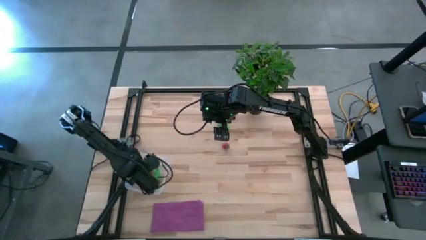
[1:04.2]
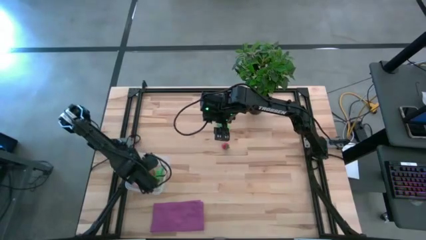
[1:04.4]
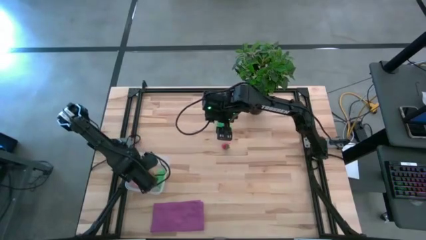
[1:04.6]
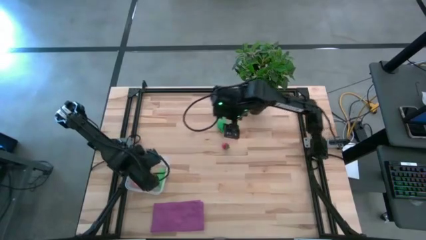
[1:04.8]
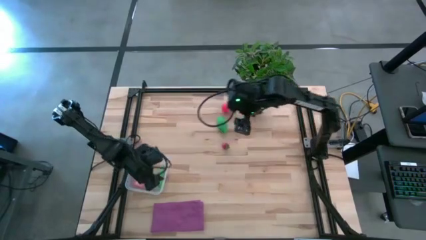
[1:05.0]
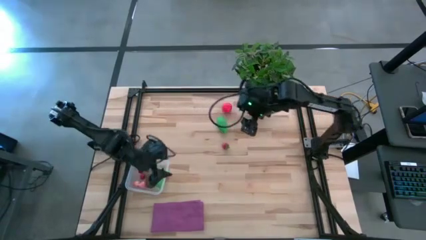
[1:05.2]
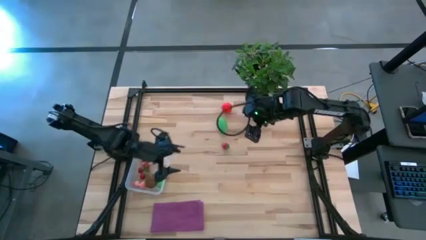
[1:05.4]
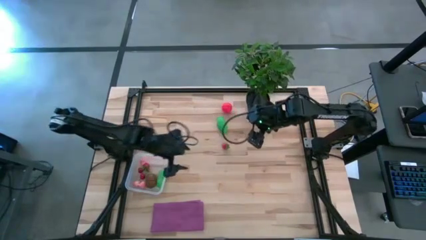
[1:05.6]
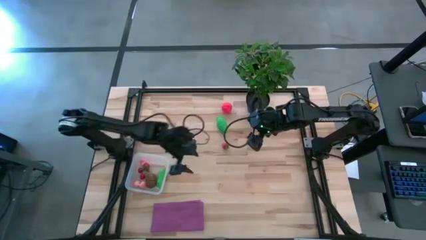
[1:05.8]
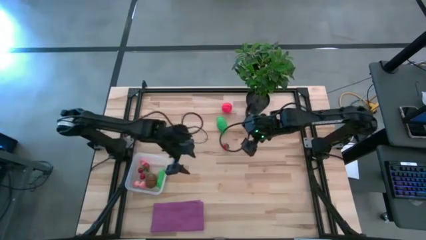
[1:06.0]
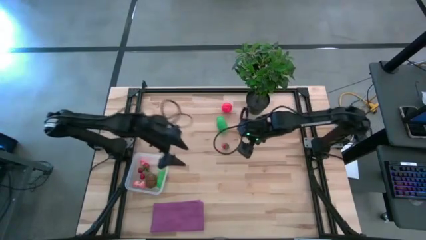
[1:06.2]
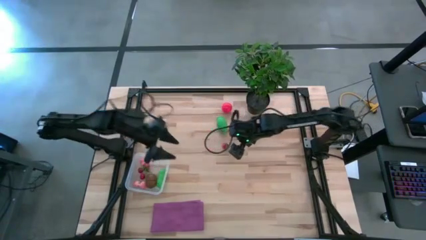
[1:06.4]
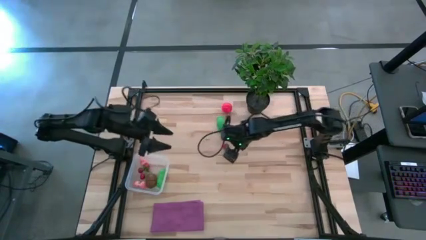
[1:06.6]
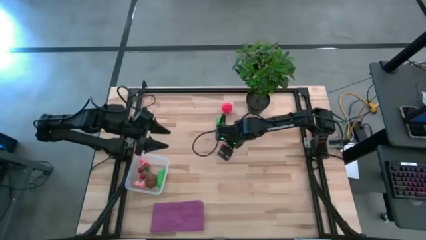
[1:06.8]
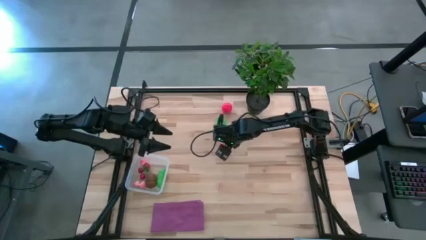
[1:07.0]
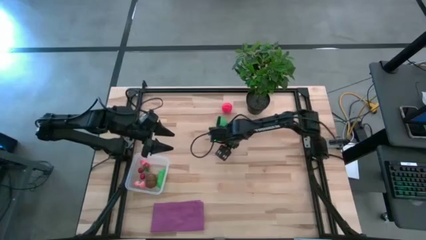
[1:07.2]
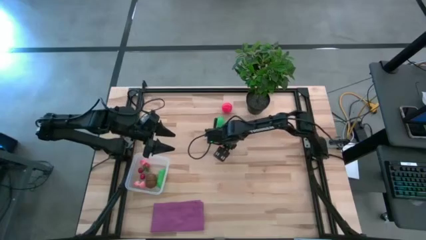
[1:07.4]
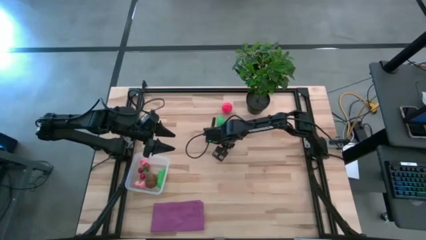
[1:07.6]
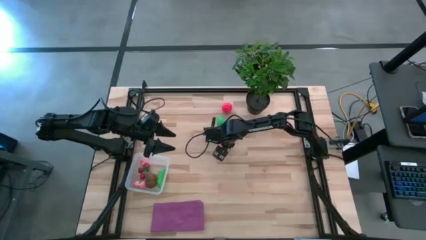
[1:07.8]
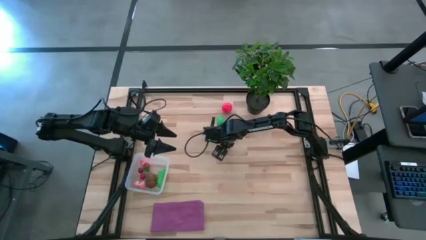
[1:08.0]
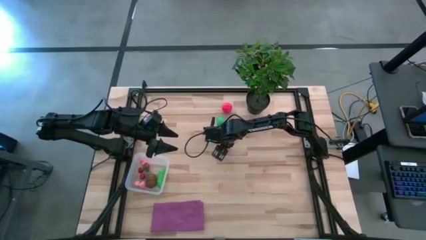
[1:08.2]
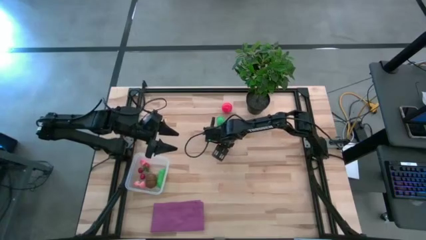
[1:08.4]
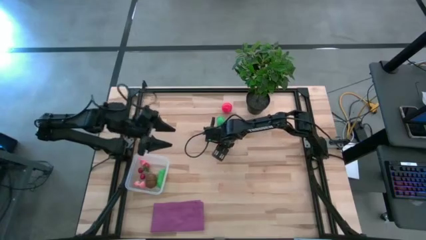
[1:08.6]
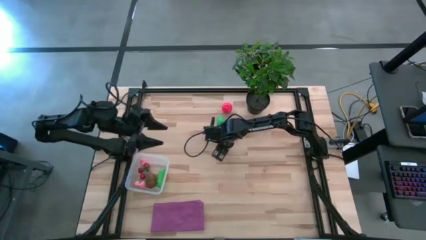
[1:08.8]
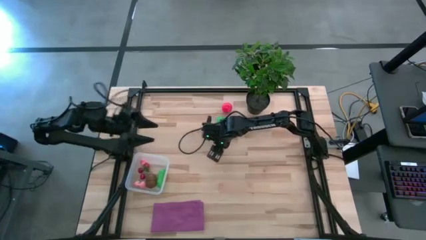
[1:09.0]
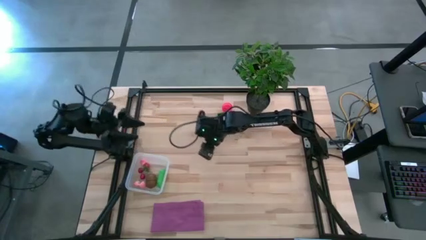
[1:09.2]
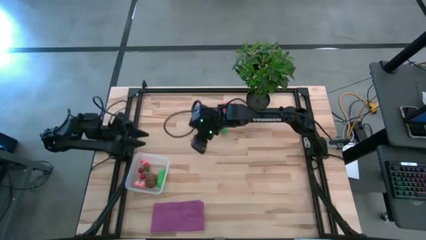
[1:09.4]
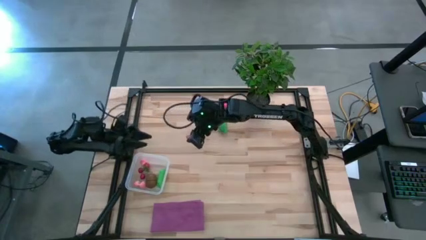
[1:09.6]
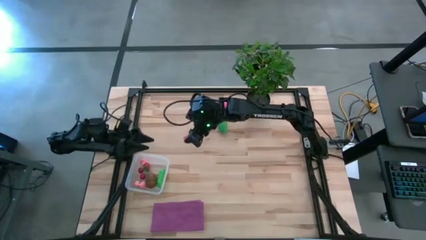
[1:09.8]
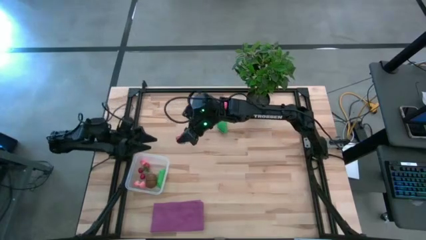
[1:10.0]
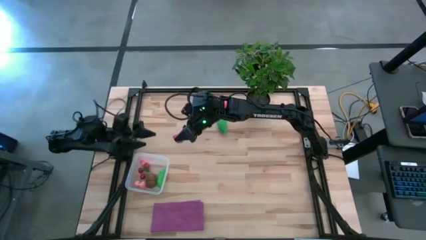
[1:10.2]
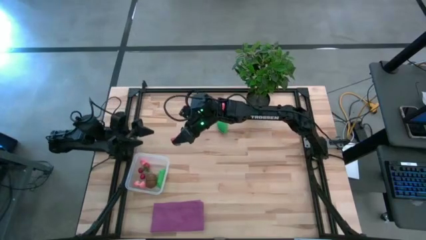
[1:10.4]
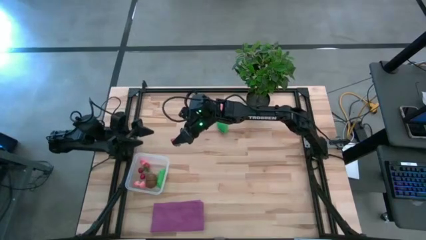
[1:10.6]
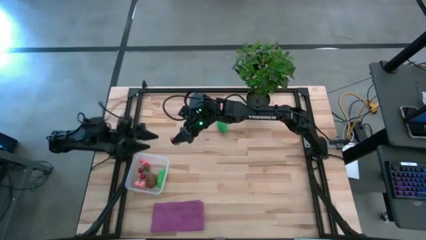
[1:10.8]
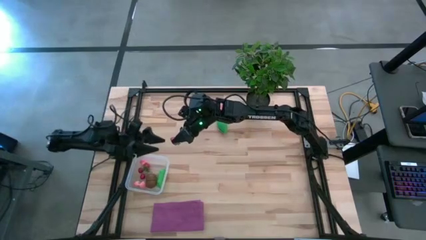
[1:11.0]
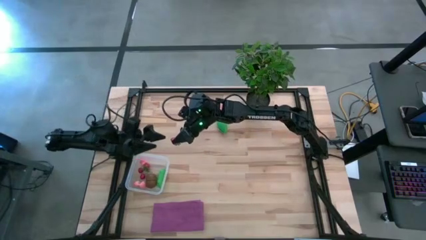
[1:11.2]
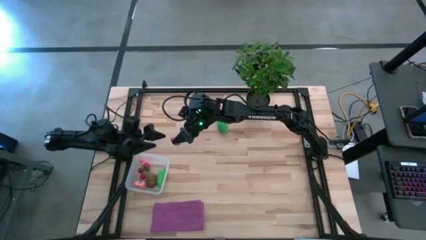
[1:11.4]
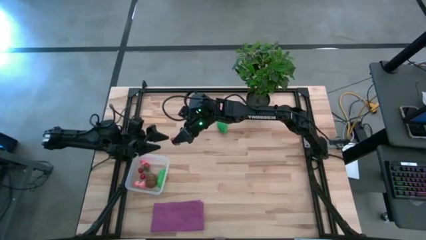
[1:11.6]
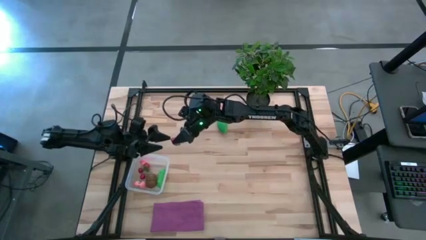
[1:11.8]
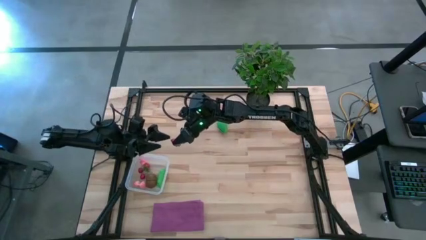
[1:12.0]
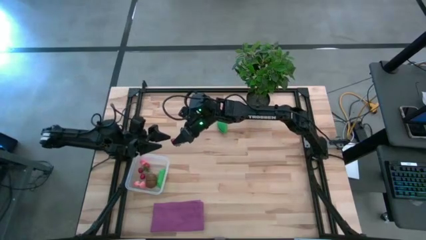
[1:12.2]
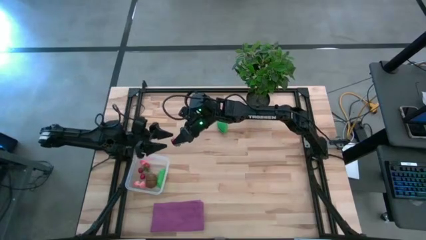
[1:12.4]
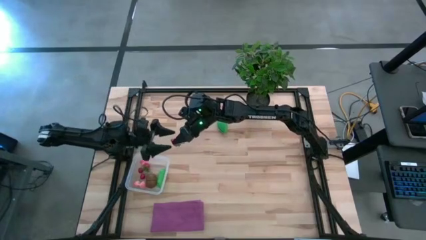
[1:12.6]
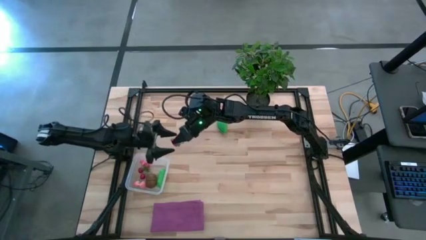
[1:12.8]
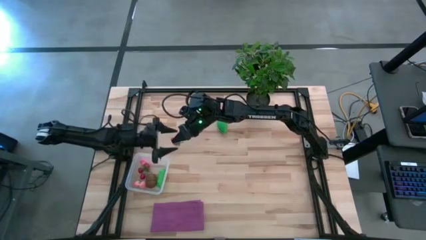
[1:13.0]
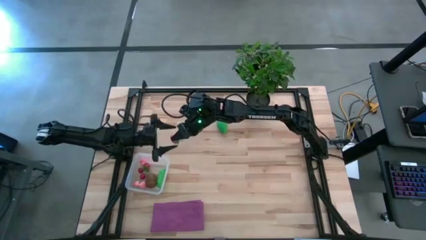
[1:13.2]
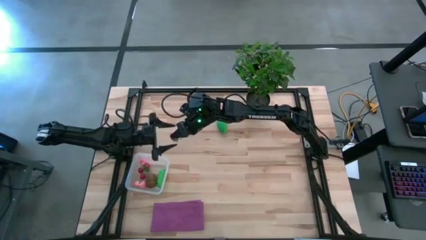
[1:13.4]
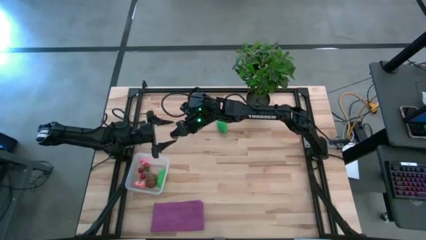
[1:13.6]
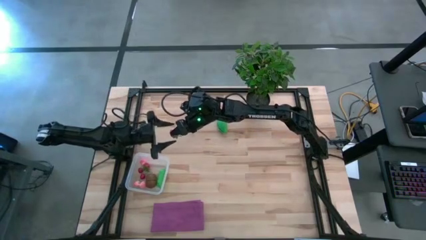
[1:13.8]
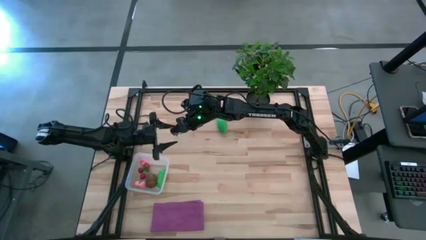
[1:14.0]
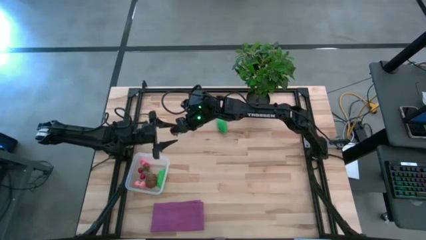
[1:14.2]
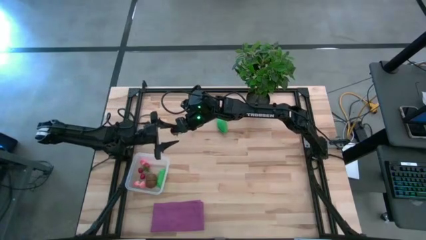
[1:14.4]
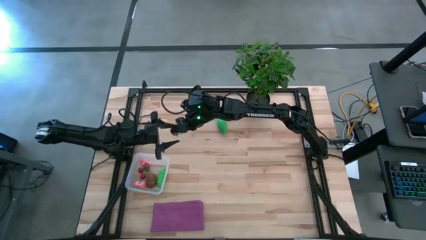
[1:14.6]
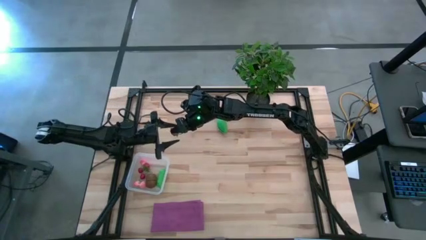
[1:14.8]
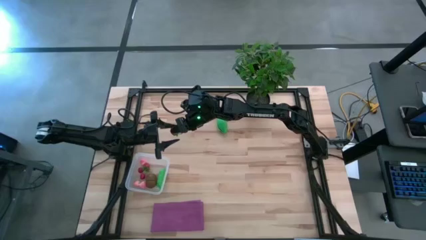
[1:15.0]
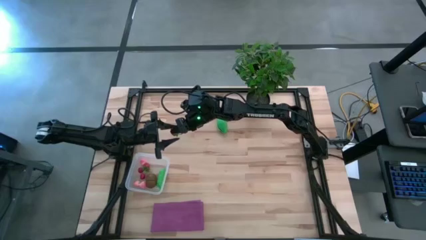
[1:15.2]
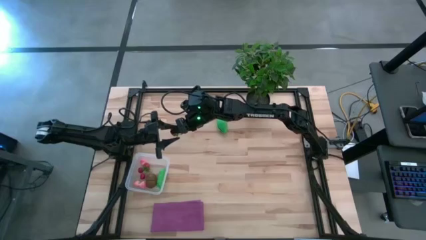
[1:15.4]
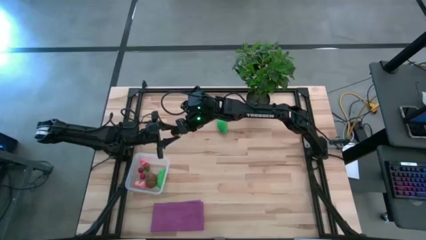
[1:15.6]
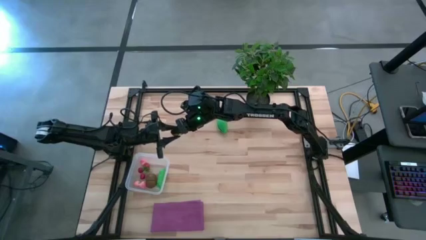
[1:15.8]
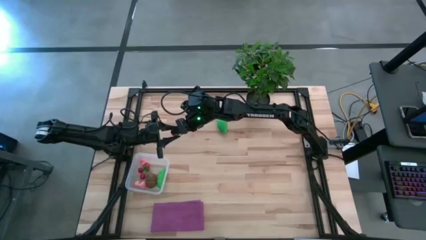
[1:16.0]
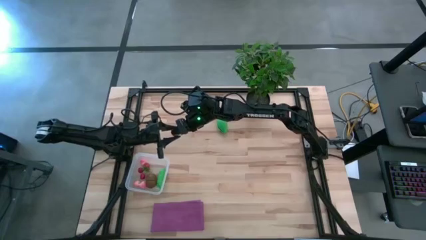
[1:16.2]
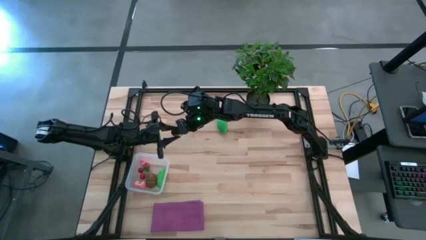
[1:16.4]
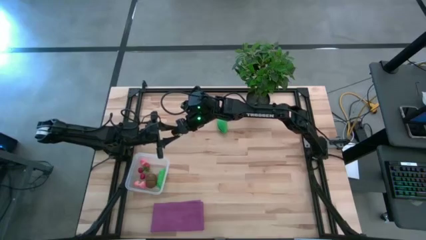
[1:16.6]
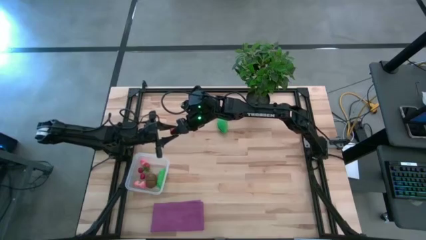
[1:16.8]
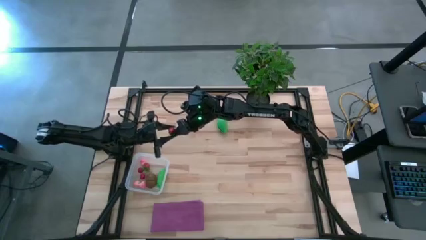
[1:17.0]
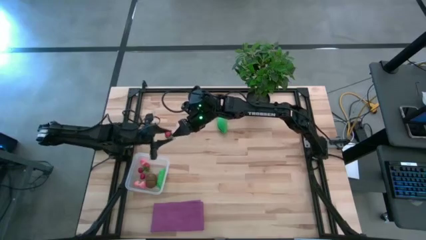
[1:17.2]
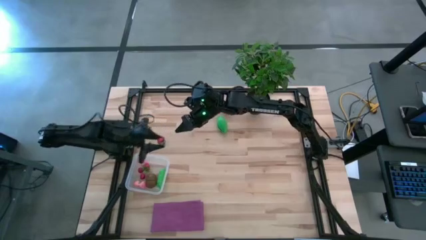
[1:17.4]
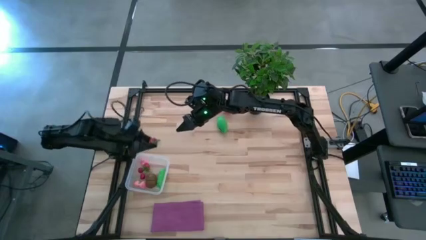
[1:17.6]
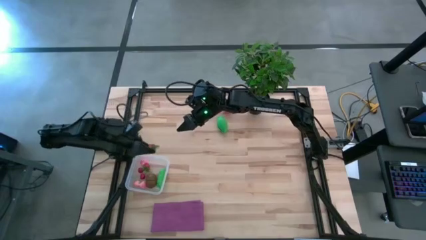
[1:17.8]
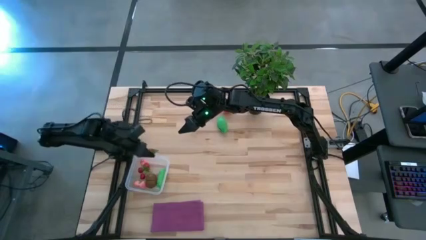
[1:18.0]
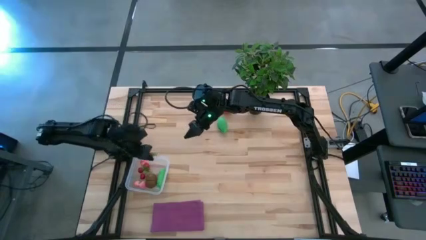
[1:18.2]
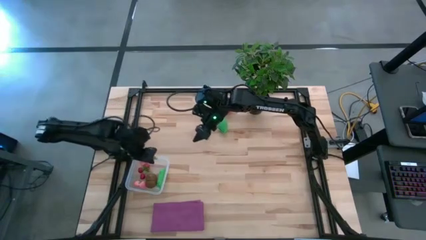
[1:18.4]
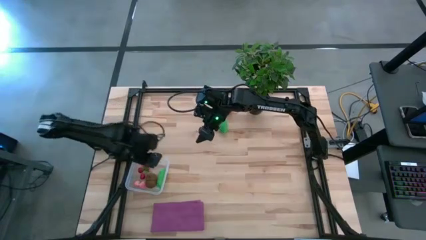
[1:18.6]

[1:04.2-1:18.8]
Task: Pick and placing Produce into tupperware
Put the red strawberry into the transparent container

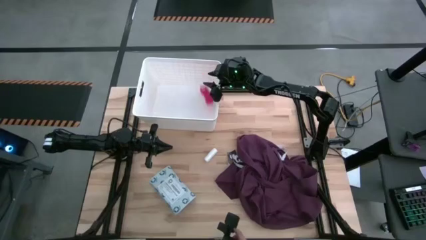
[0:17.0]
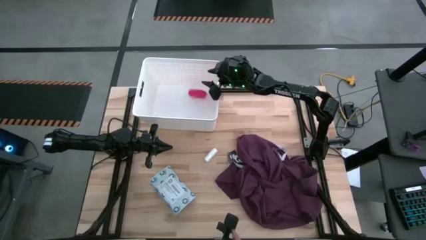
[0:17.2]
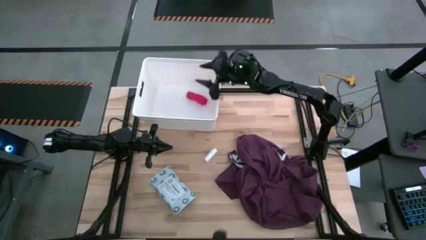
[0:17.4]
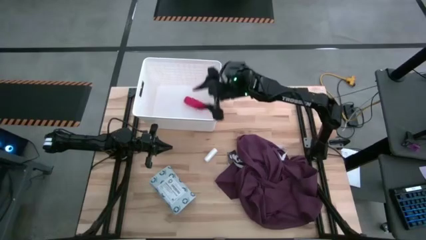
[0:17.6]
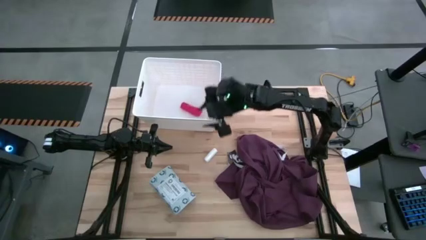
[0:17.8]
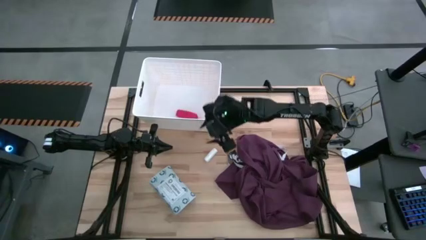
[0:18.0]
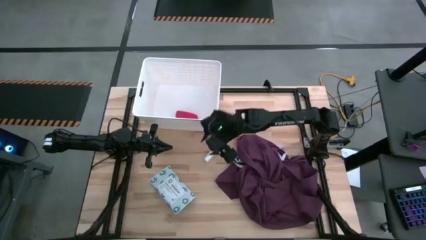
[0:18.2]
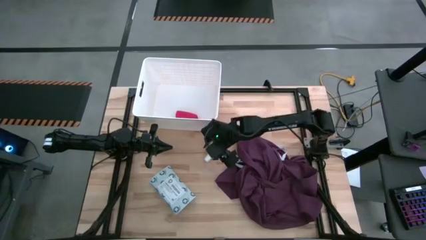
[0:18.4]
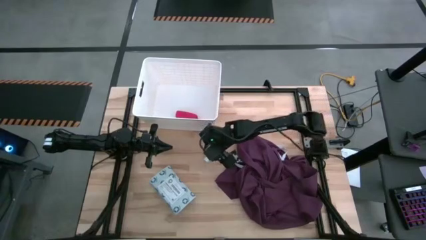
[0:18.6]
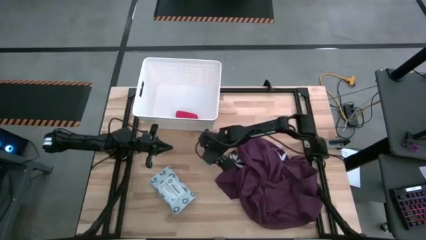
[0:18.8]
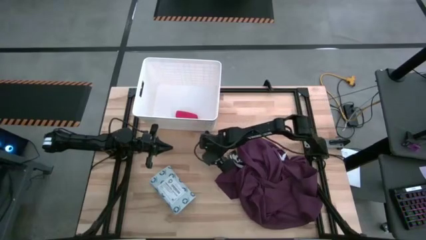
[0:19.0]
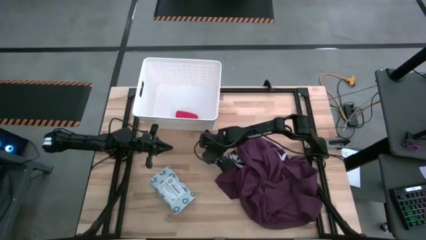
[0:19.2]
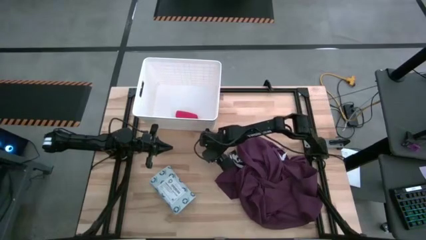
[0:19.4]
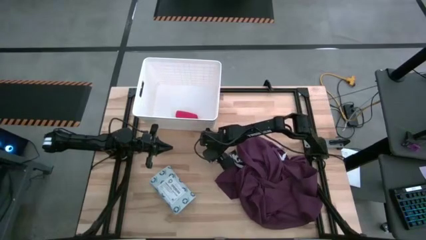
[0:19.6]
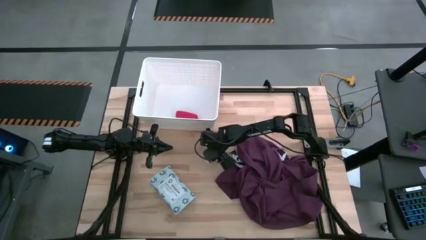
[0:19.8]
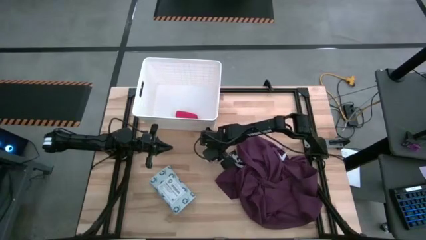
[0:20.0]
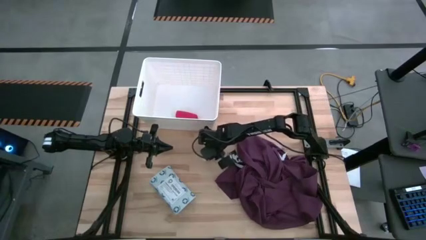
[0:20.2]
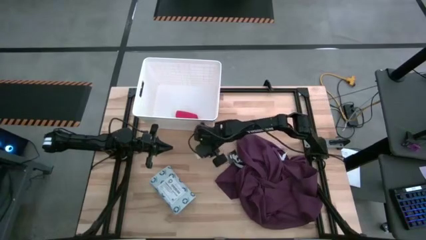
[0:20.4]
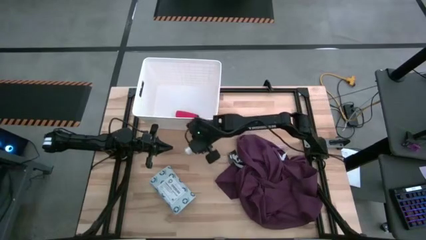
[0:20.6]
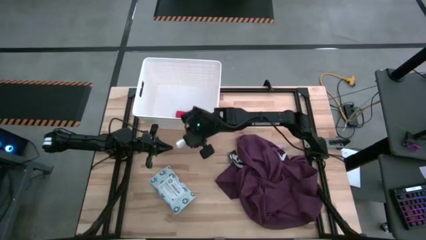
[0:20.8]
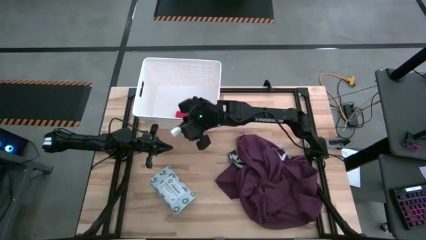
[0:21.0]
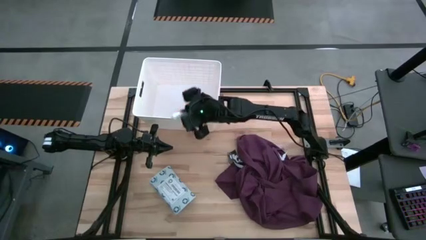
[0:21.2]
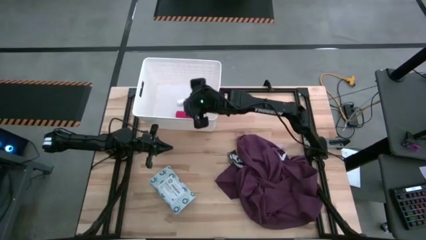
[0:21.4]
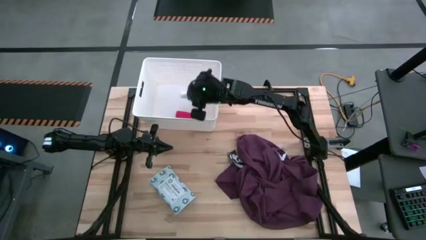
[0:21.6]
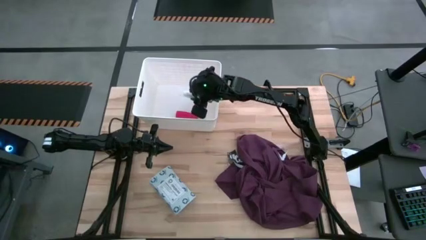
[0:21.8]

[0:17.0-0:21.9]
Task: Pick & place medical supplies in basket/bin
Put the rolled gauze into the white bin
